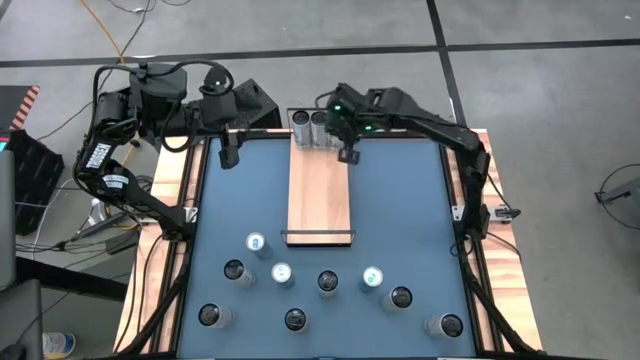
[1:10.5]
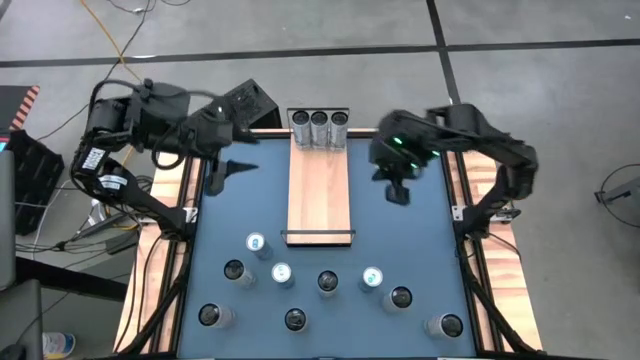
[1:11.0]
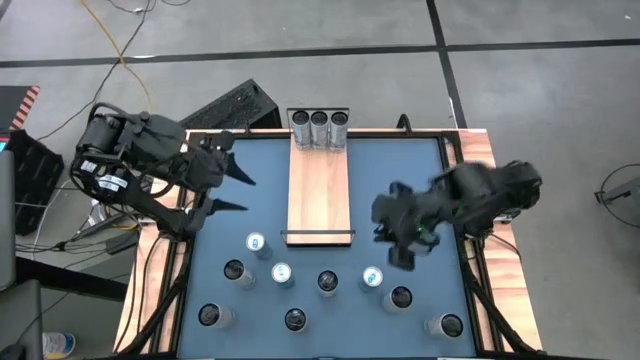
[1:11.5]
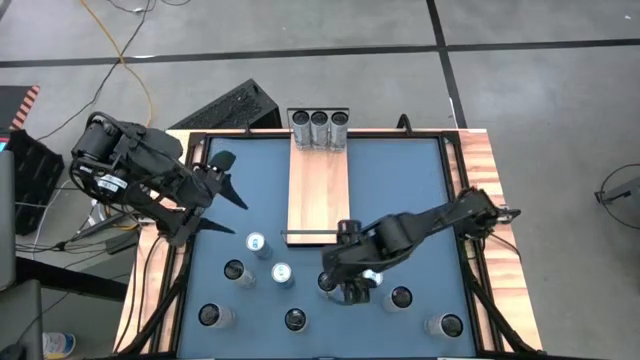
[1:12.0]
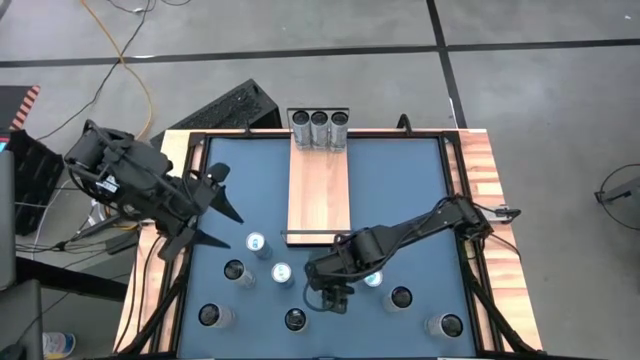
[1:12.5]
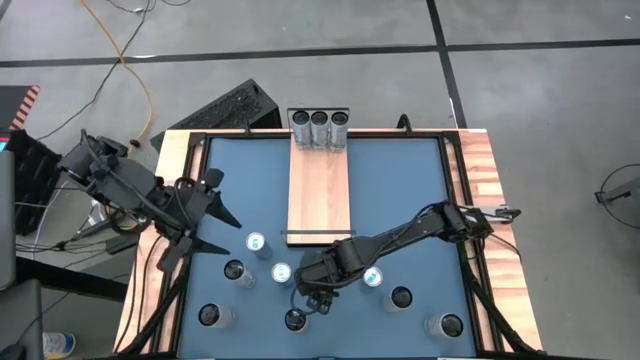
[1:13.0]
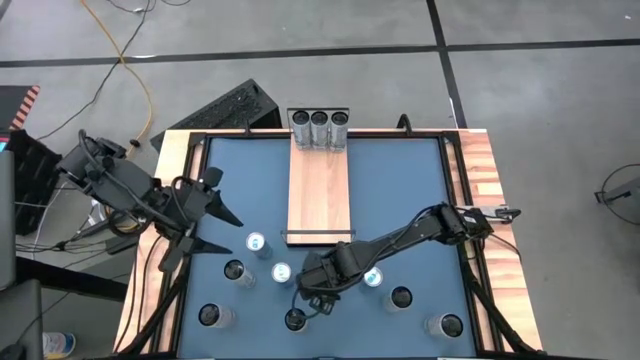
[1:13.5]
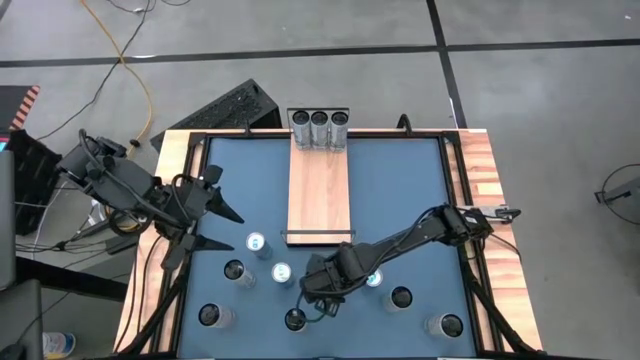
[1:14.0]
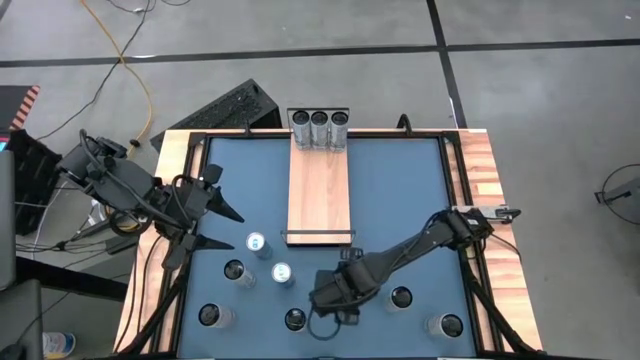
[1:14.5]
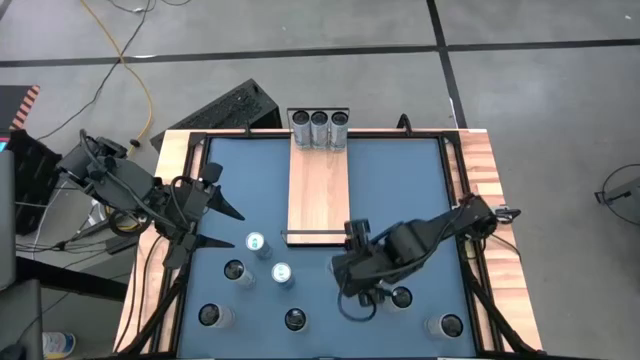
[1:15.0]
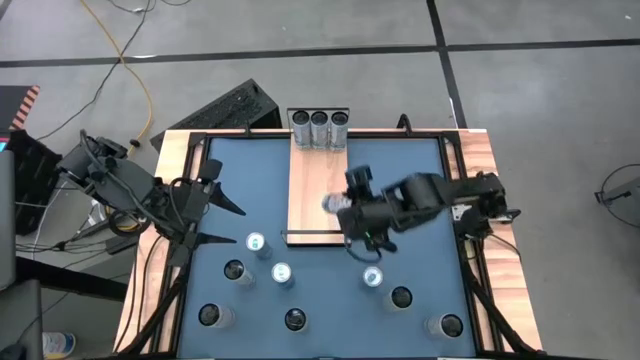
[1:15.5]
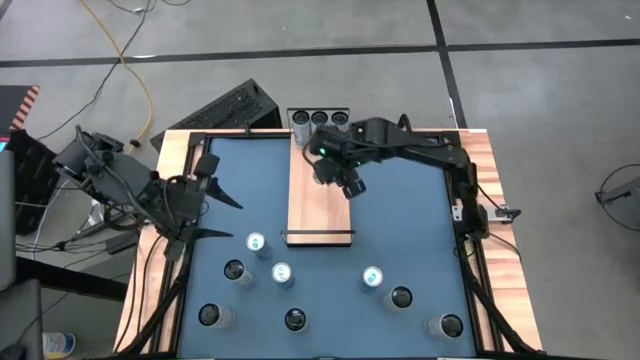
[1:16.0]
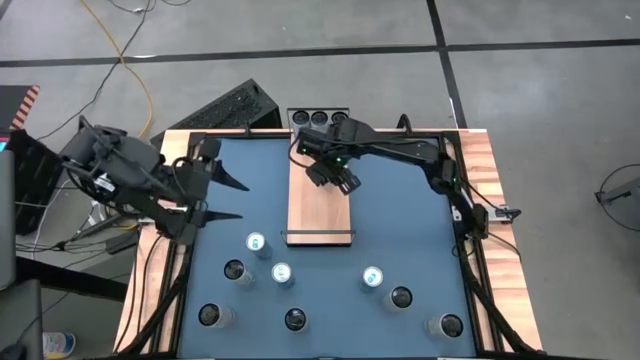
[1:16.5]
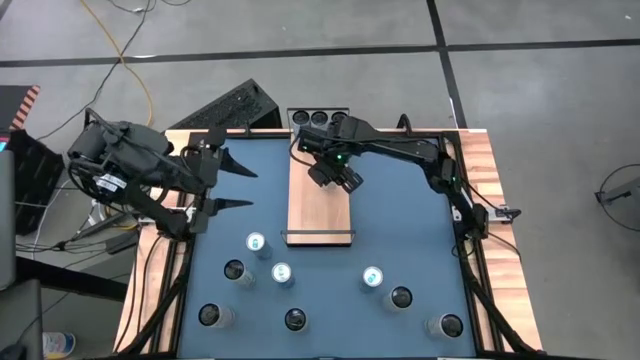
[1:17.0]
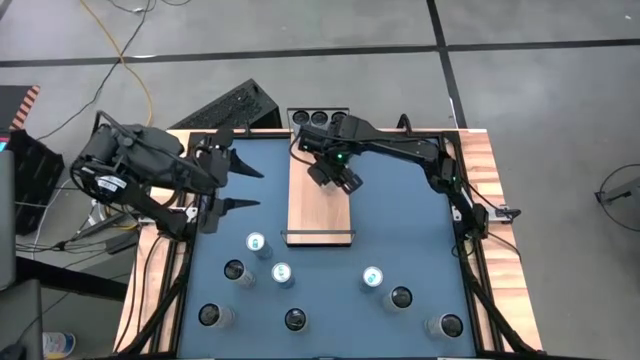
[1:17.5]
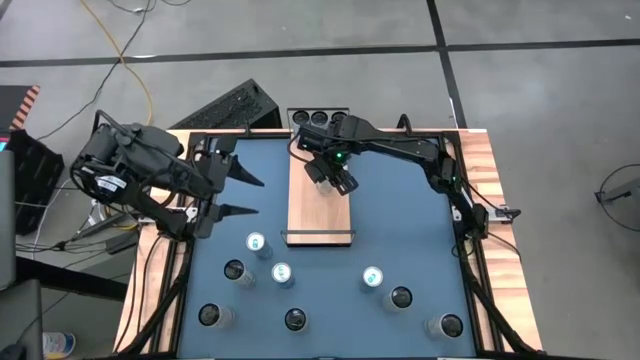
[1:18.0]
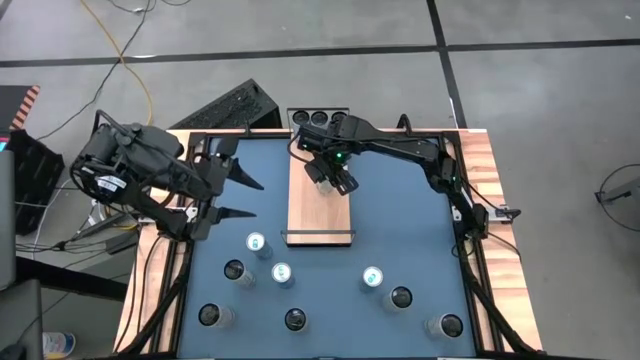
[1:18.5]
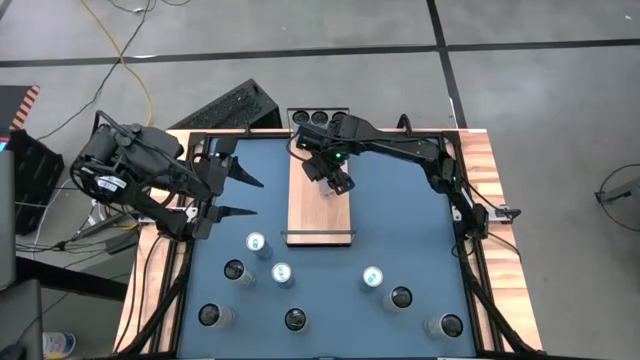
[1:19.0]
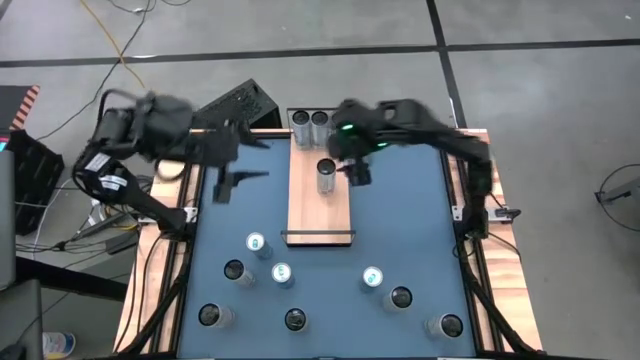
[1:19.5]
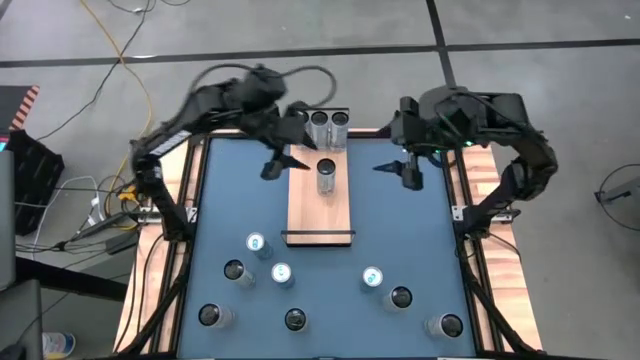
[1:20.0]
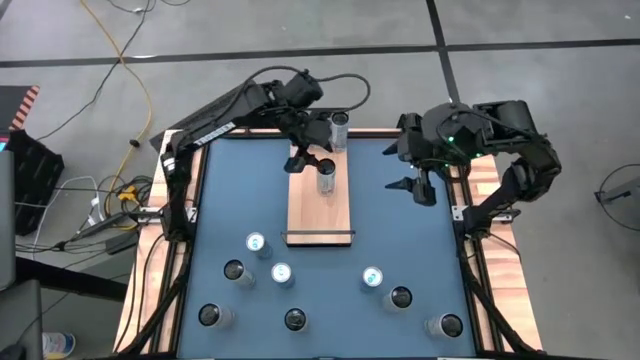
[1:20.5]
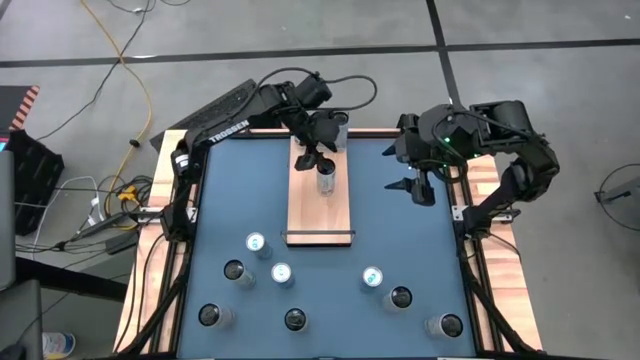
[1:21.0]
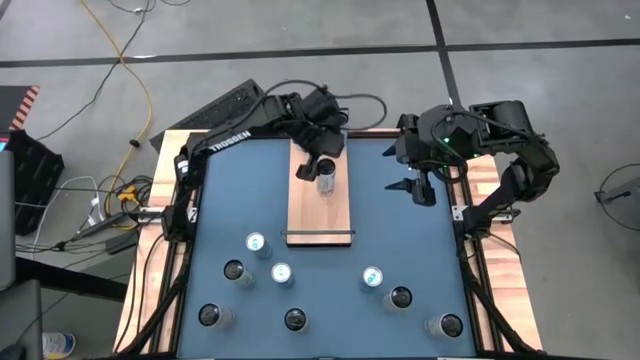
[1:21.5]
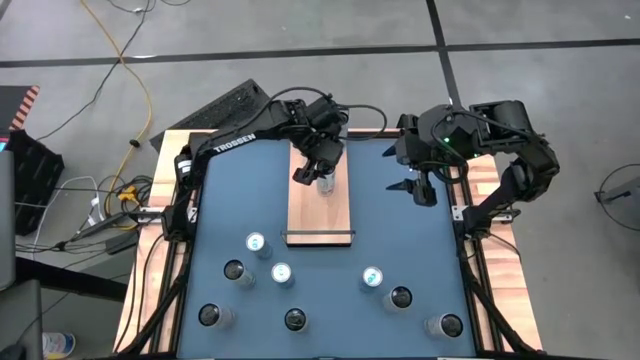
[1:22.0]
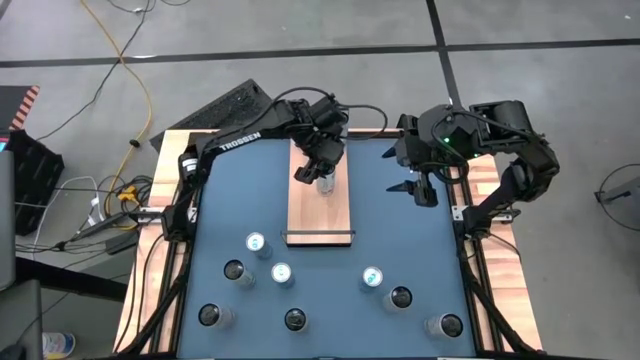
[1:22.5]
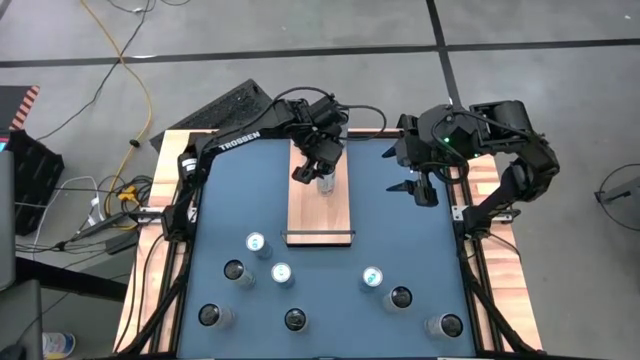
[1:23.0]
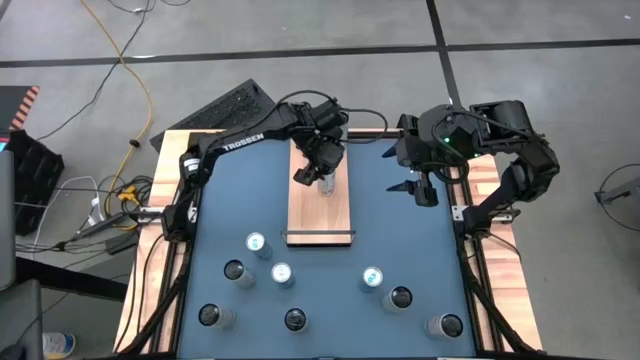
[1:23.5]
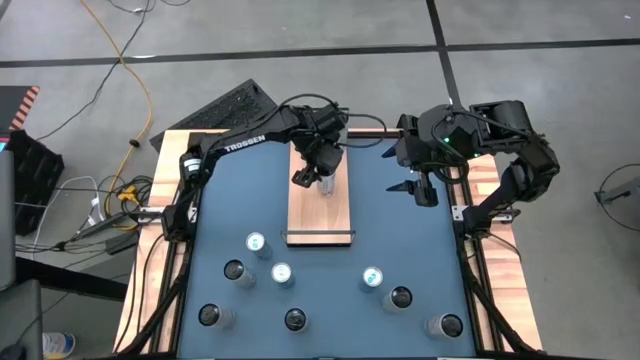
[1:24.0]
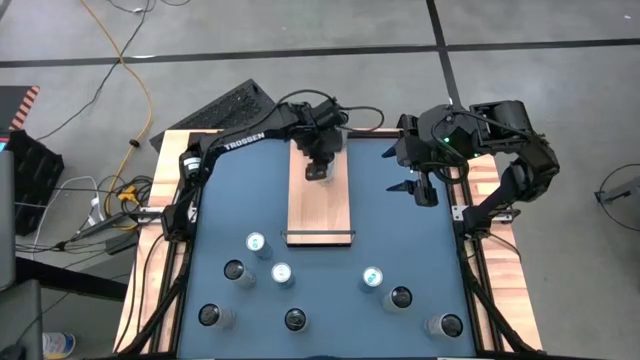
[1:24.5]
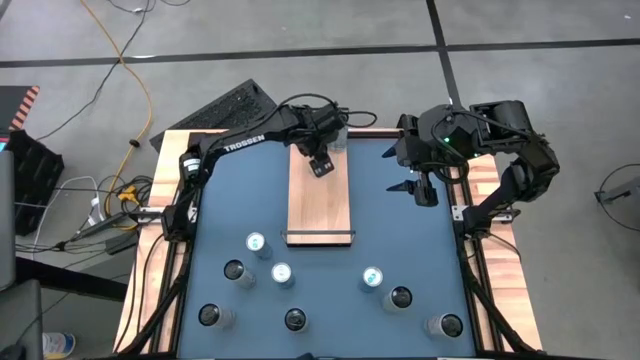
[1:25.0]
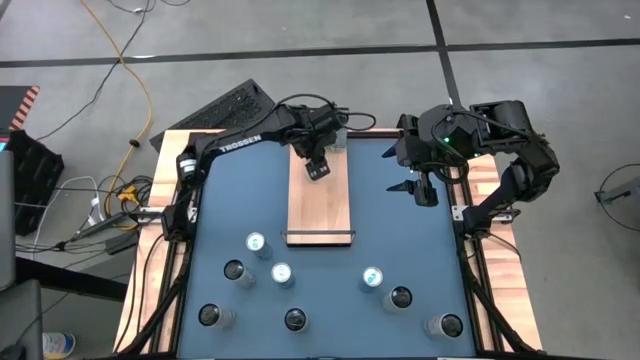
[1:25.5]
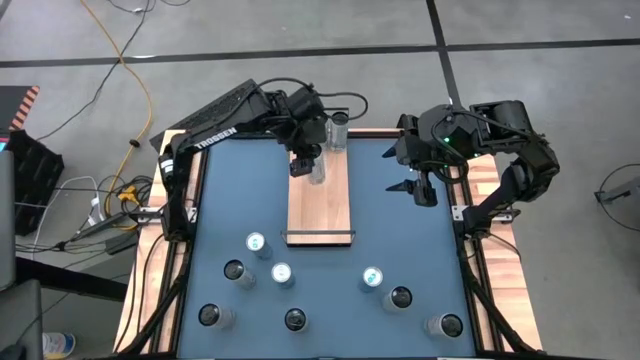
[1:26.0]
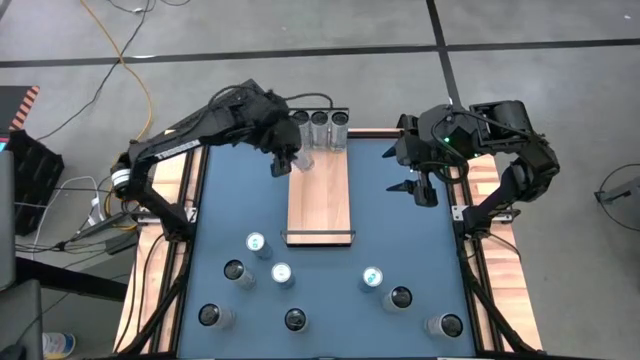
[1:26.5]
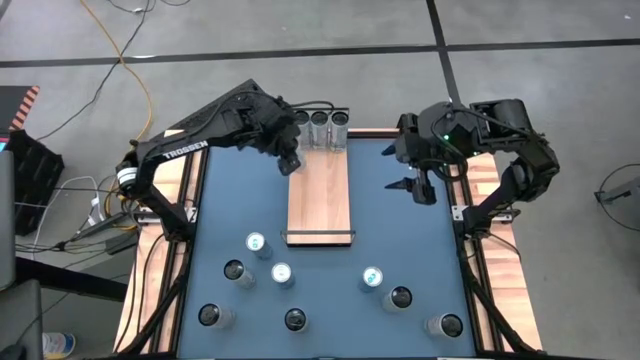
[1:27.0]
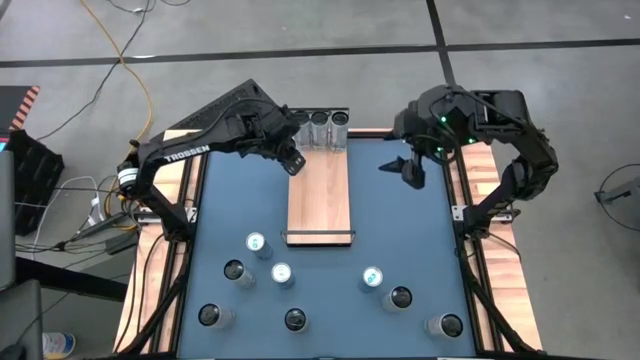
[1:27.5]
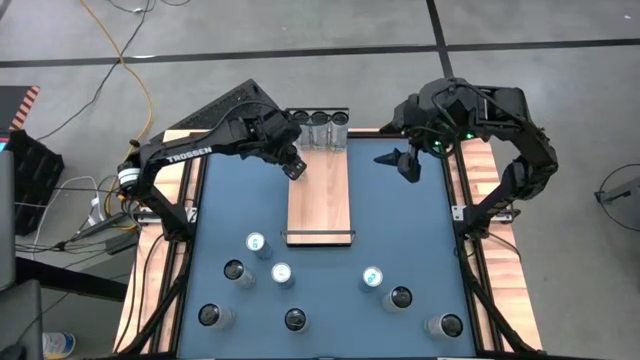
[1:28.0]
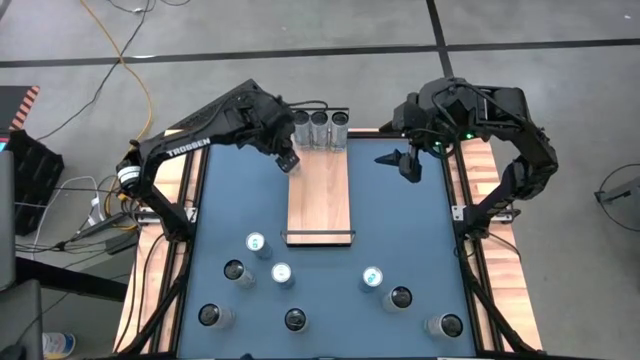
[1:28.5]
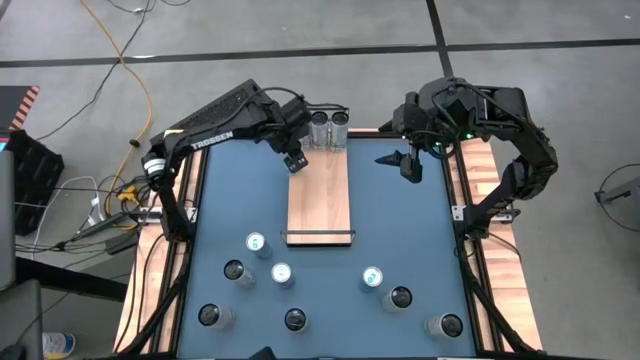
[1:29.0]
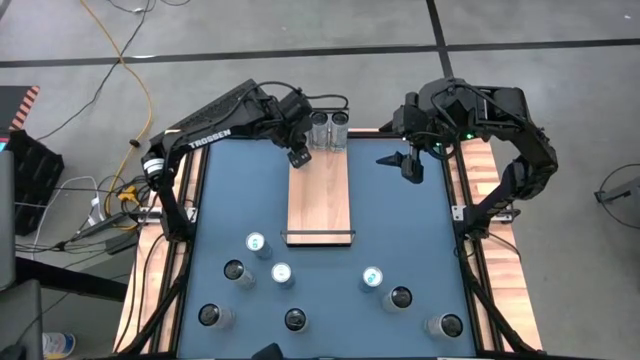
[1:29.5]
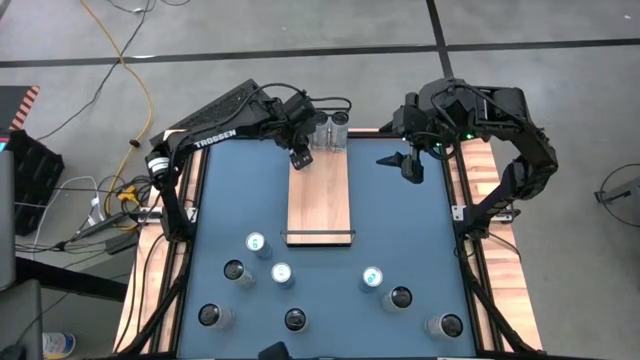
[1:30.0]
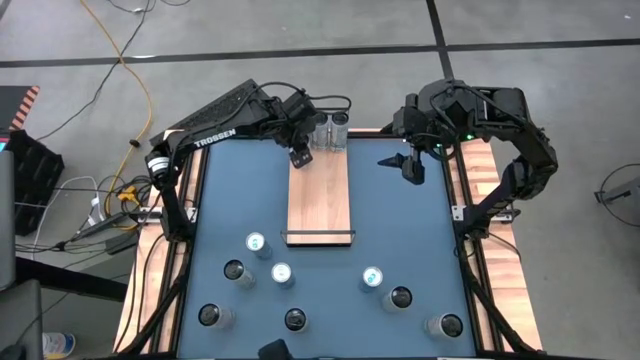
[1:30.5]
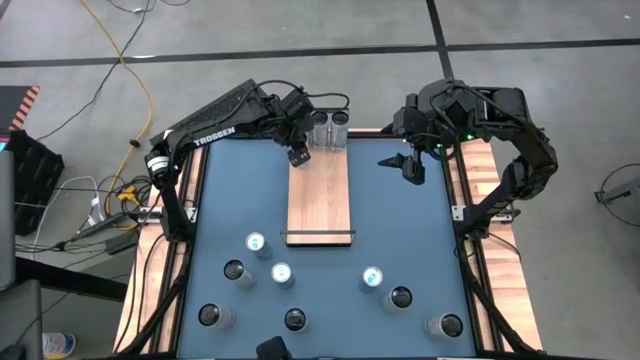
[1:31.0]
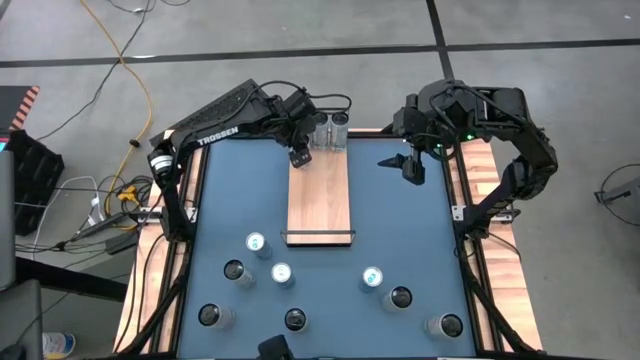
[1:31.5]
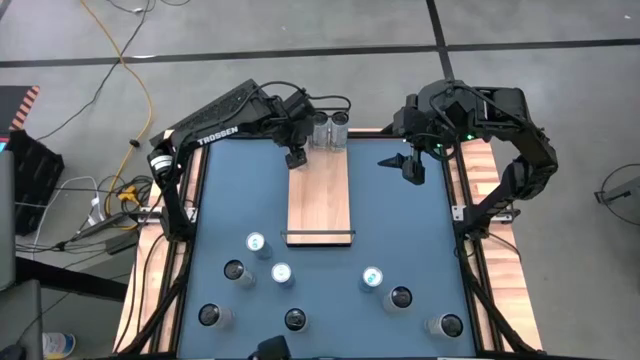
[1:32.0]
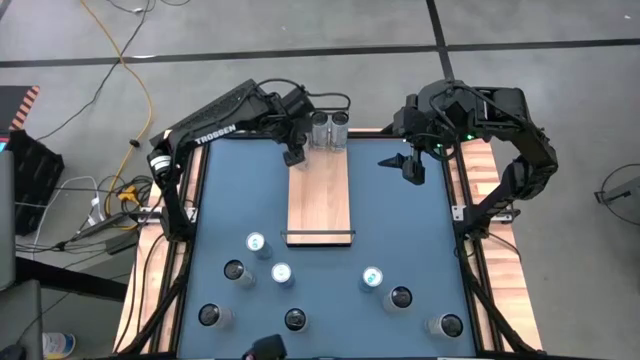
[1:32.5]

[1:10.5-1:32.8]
Task: Place canned beverage on shelf
Put the right white-pink soda can on the shelf
